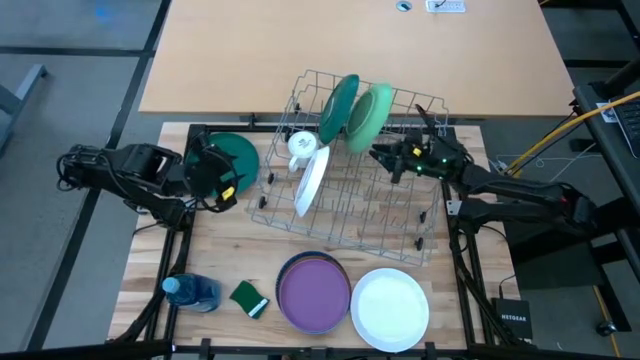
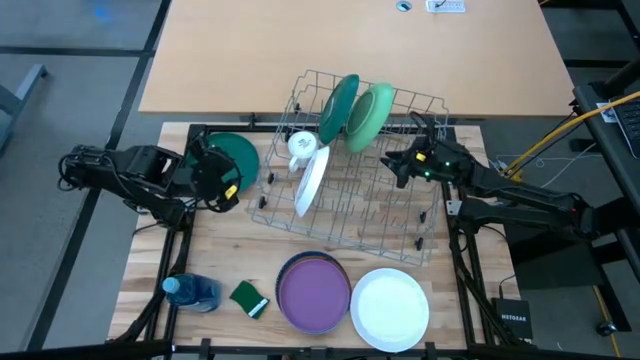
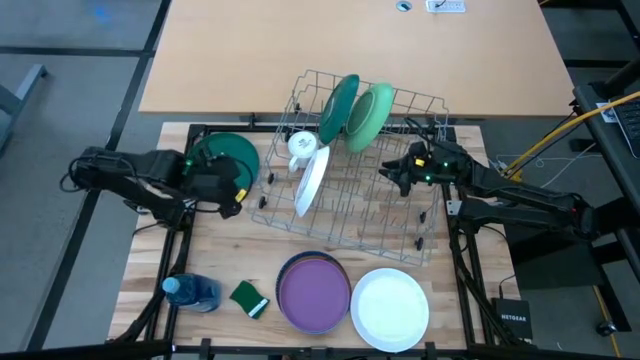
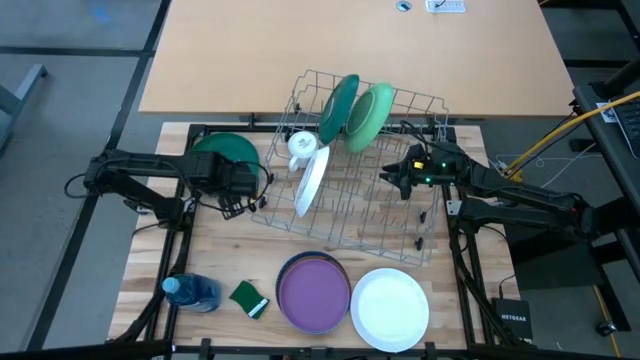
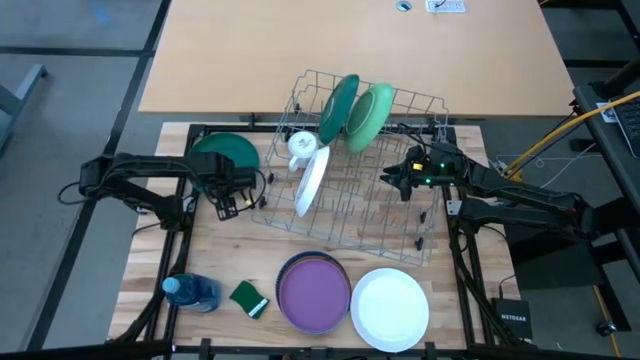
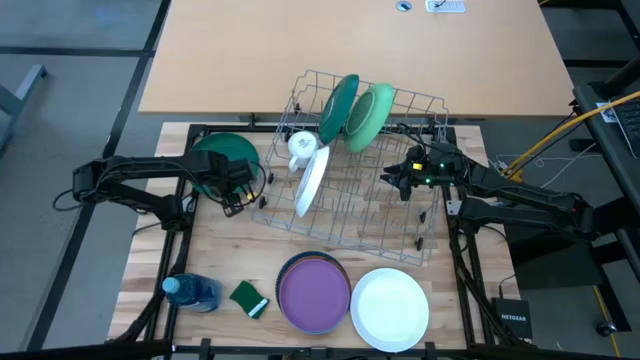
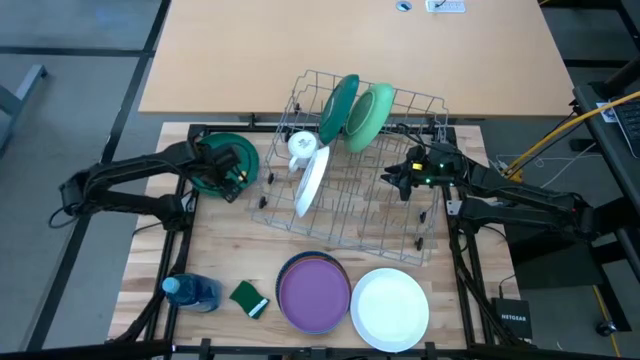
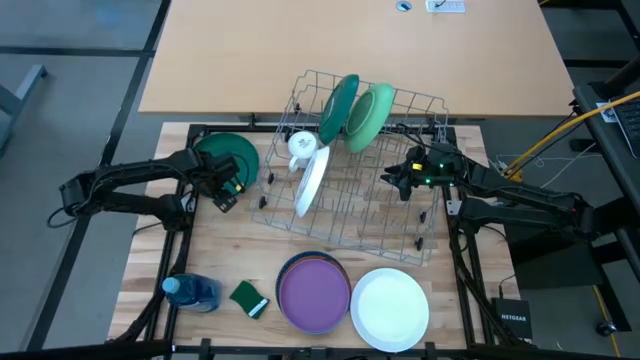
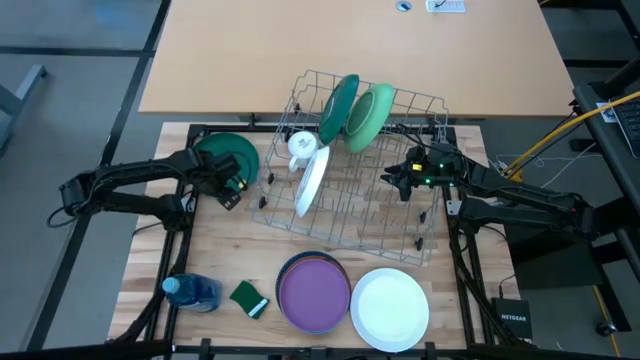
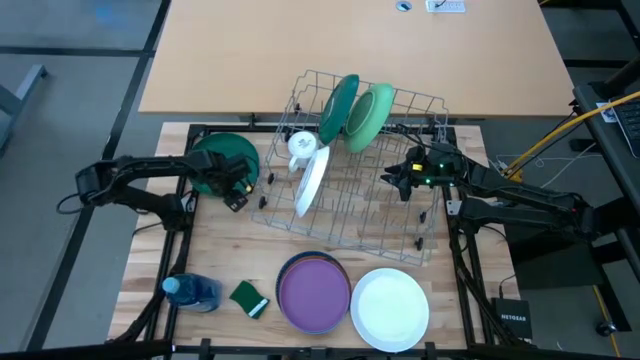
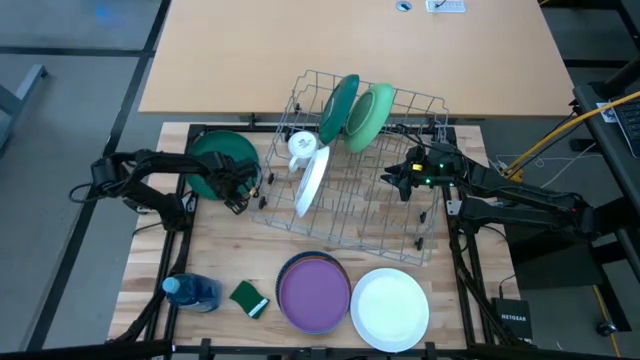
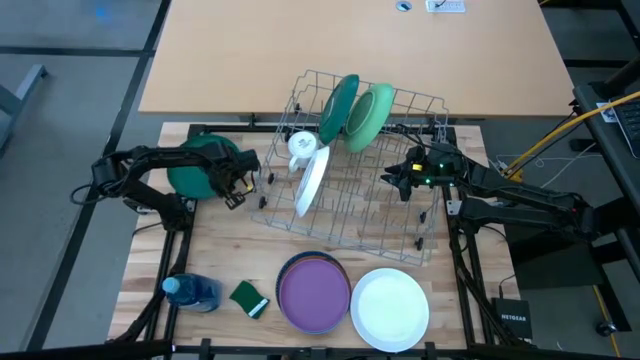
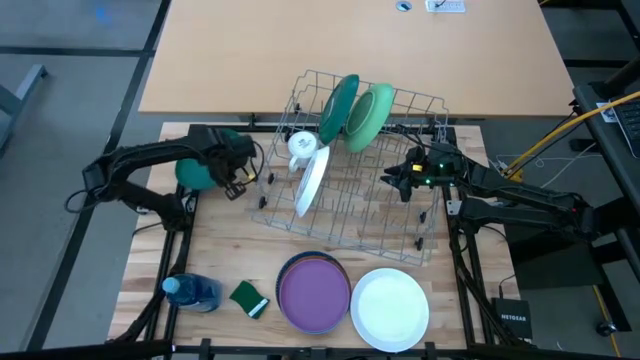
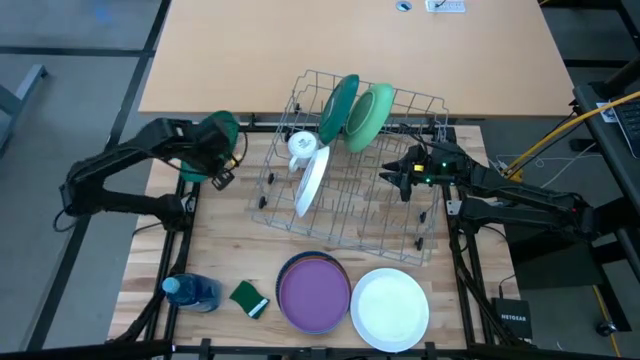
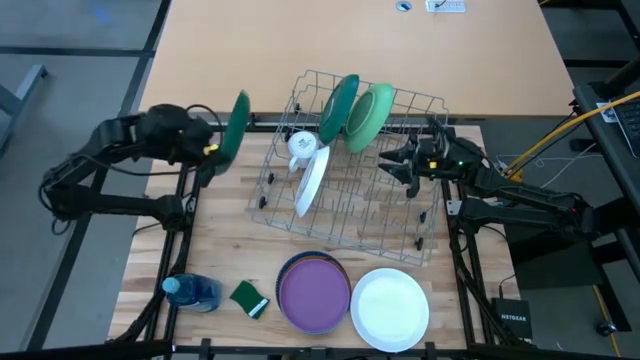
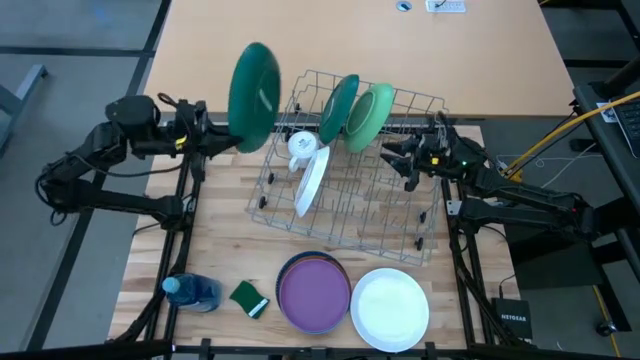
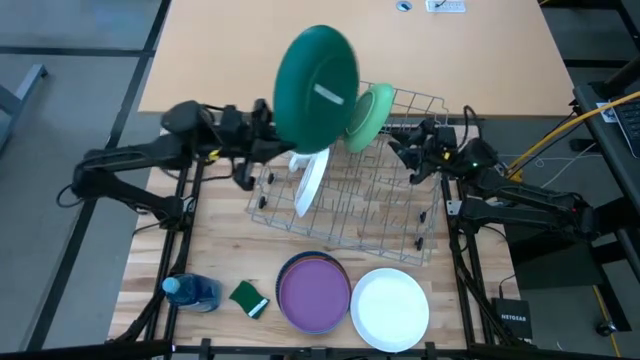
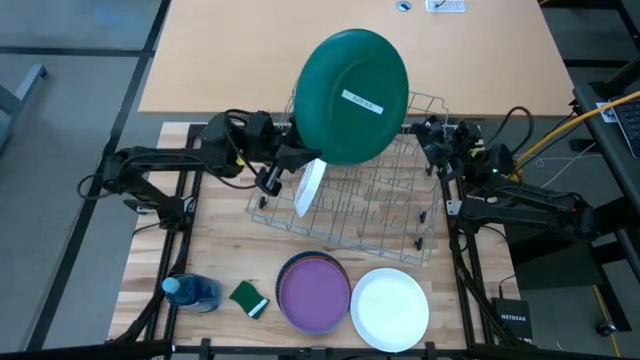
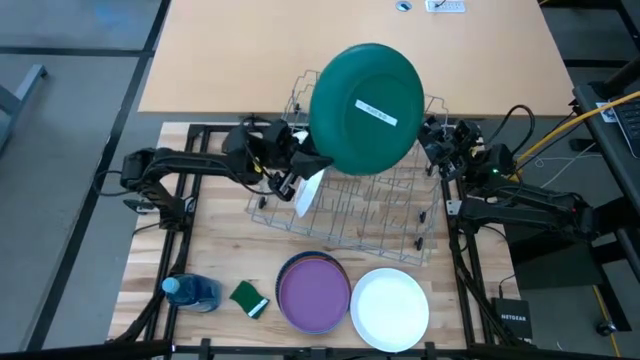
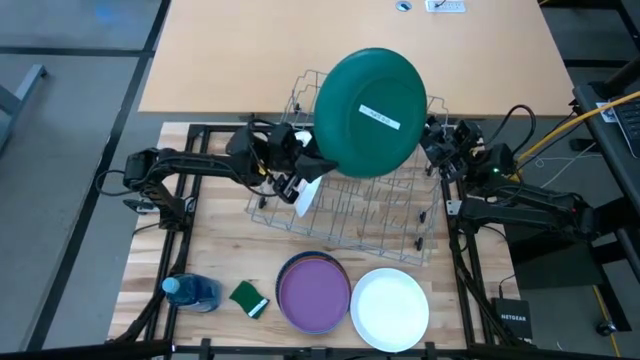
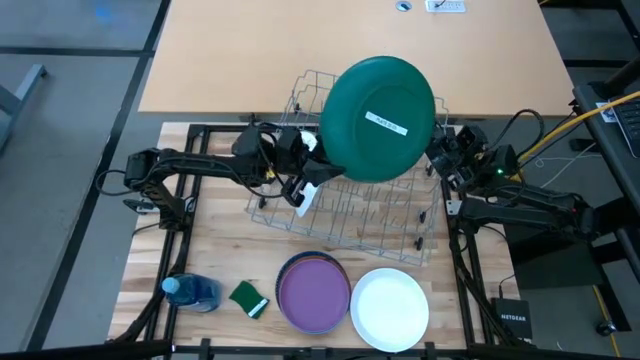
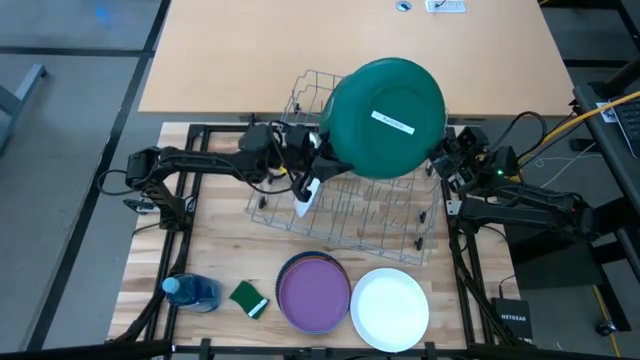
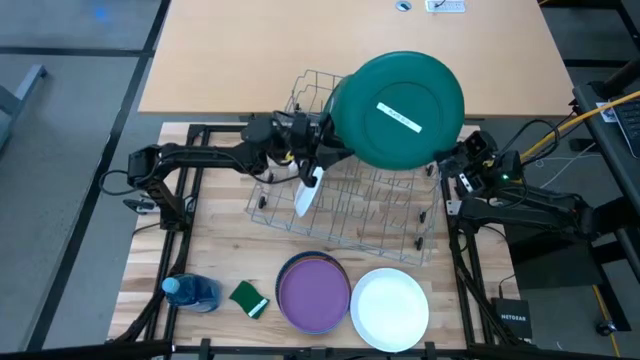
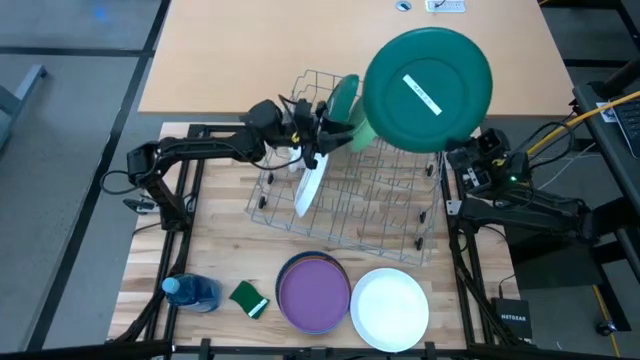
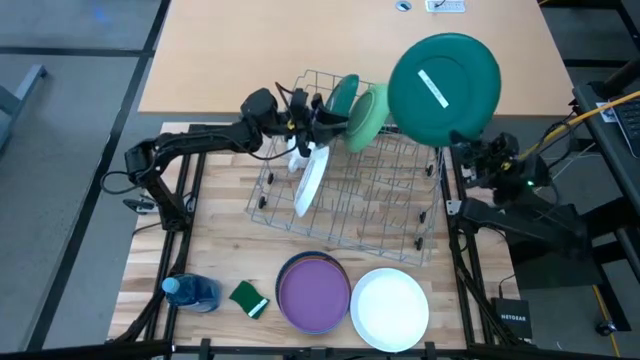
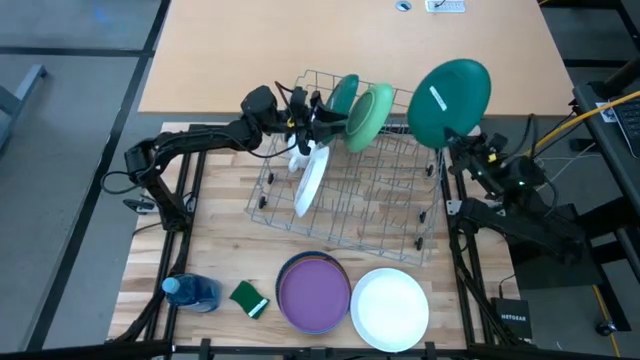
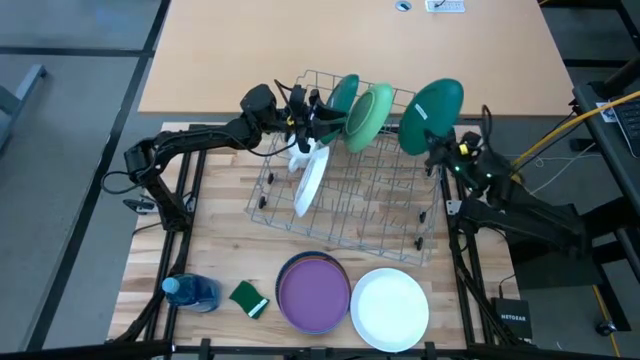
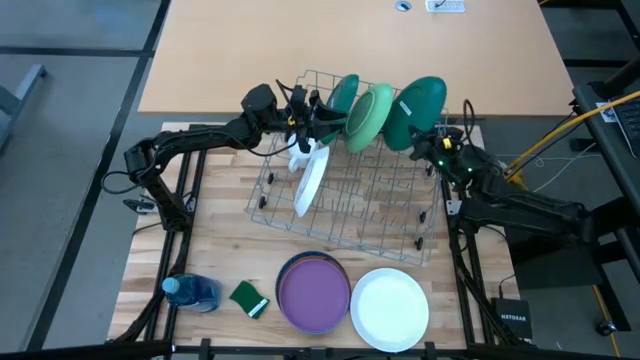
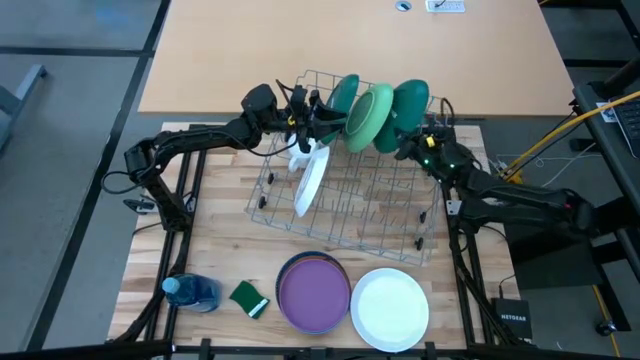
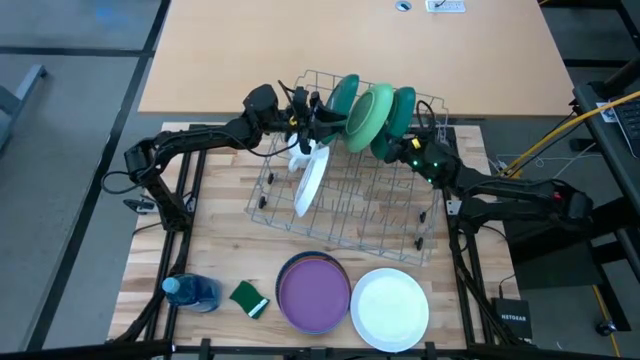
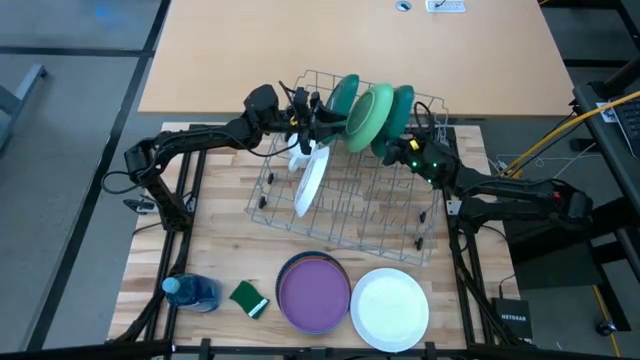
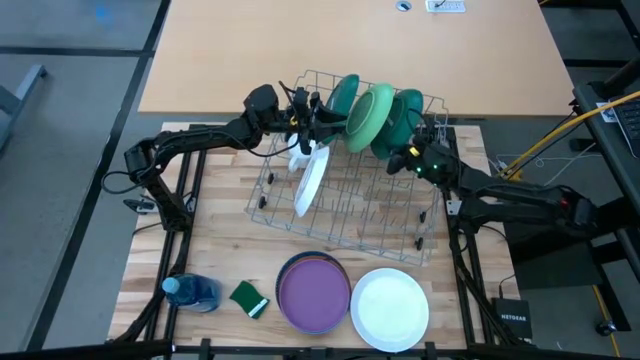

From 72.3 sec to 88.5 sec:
Task: Sort dishes
Put the dark green plate in the dish rack
